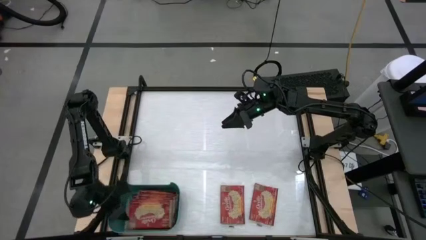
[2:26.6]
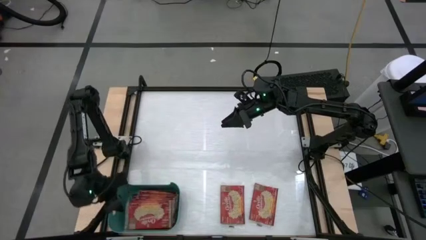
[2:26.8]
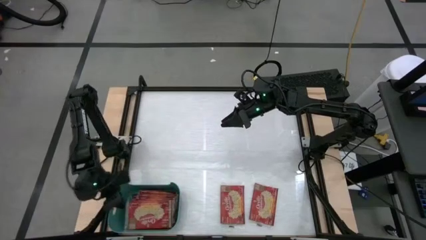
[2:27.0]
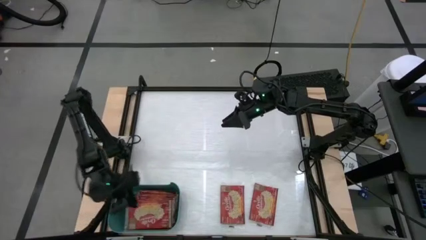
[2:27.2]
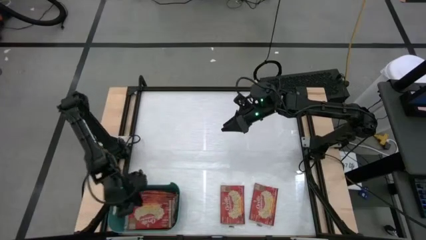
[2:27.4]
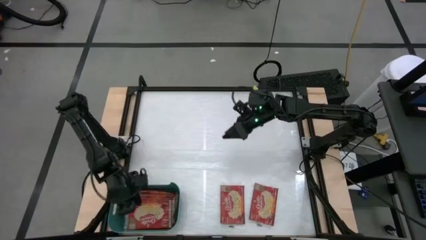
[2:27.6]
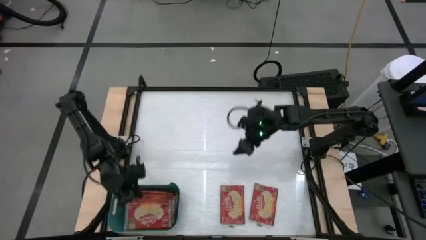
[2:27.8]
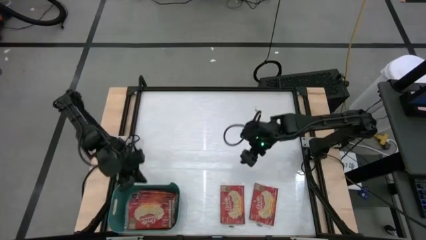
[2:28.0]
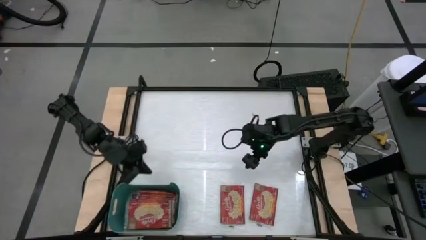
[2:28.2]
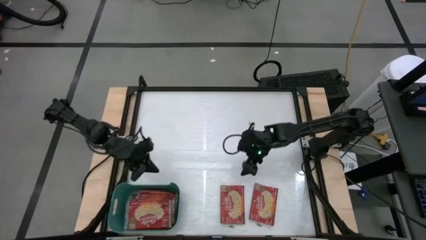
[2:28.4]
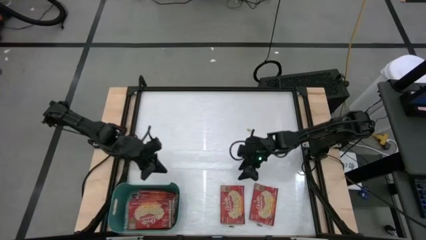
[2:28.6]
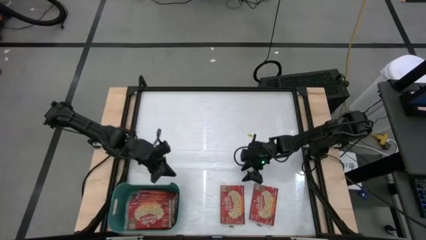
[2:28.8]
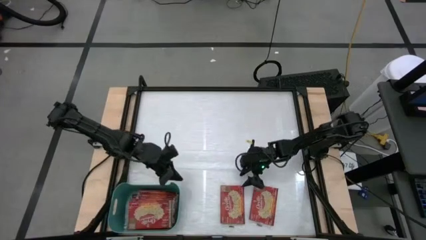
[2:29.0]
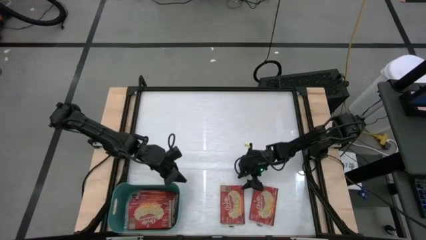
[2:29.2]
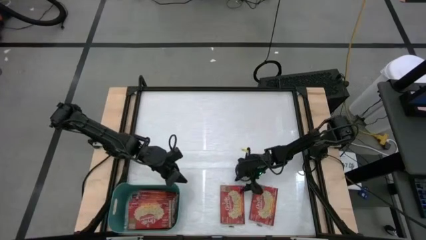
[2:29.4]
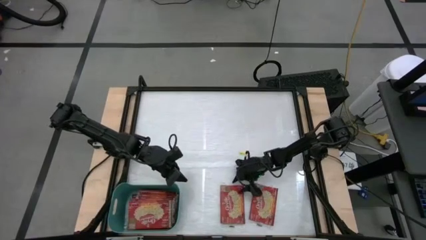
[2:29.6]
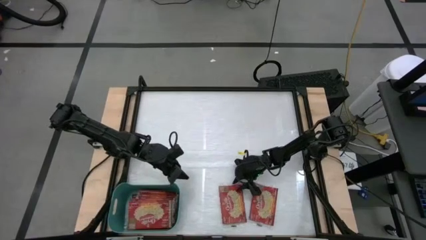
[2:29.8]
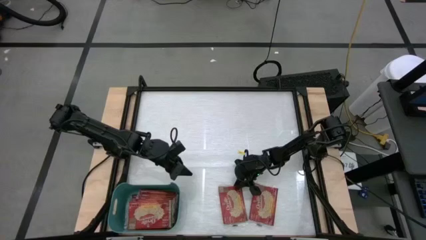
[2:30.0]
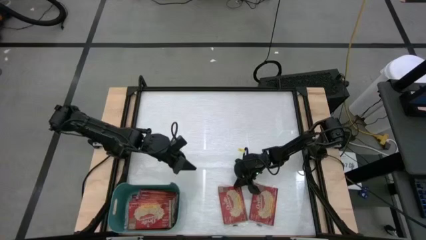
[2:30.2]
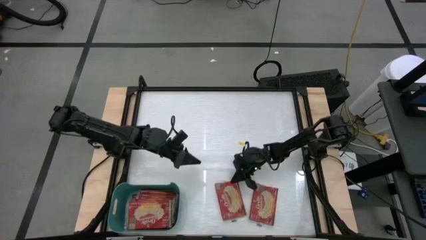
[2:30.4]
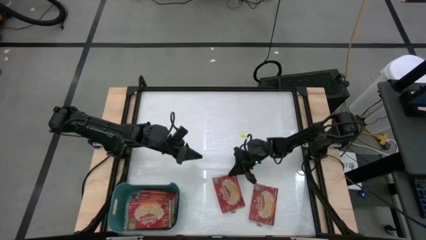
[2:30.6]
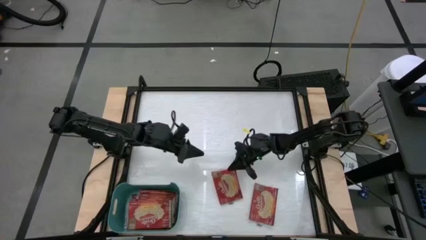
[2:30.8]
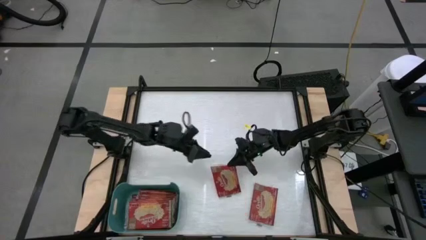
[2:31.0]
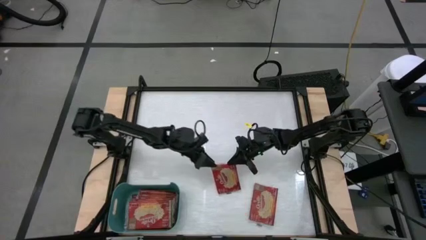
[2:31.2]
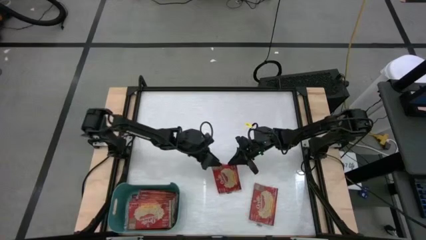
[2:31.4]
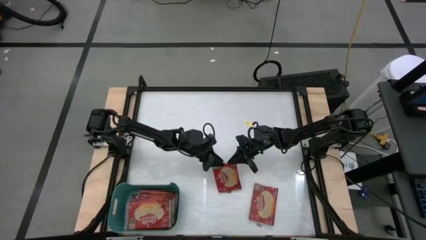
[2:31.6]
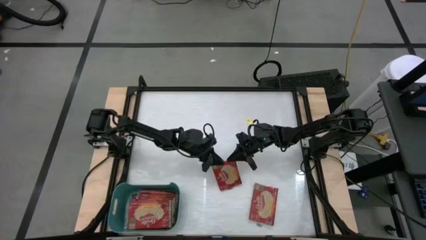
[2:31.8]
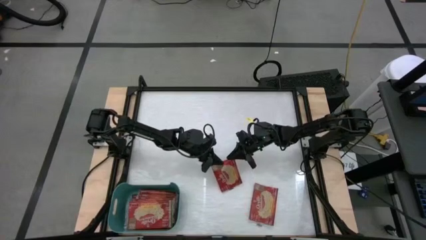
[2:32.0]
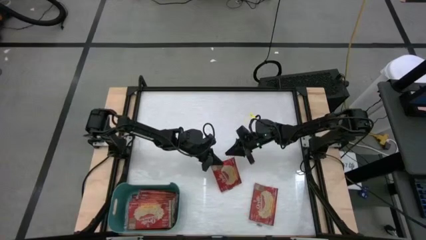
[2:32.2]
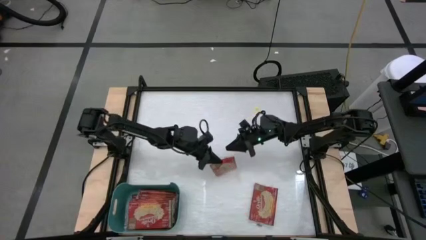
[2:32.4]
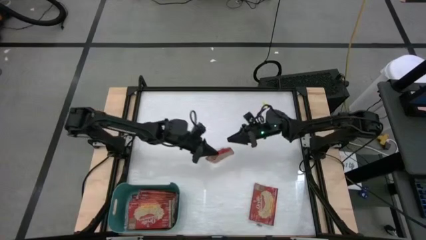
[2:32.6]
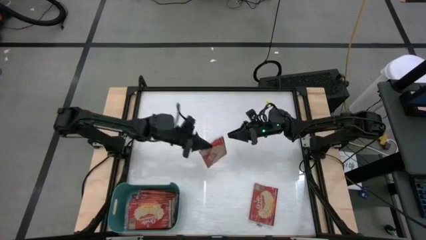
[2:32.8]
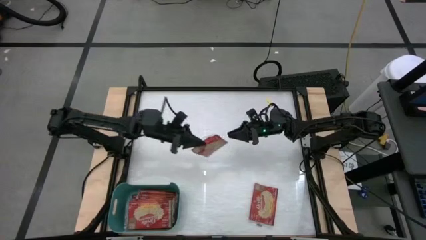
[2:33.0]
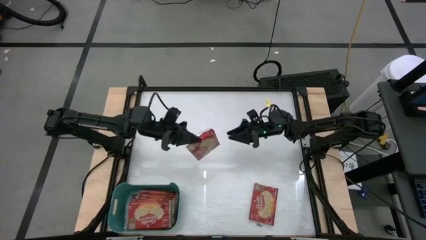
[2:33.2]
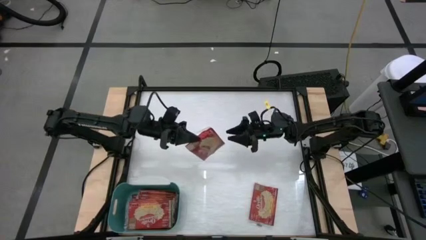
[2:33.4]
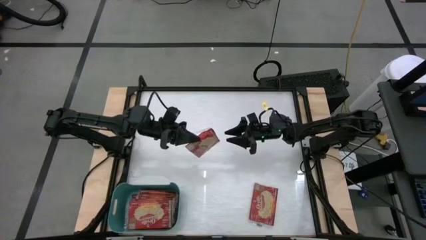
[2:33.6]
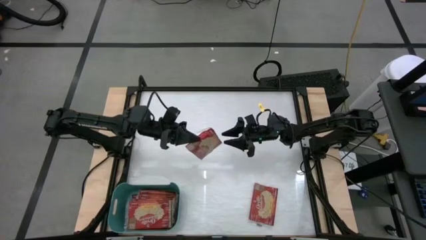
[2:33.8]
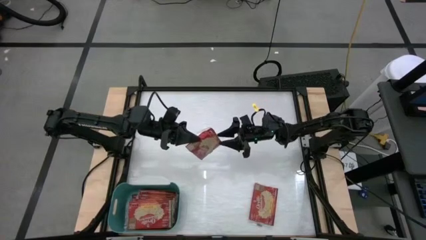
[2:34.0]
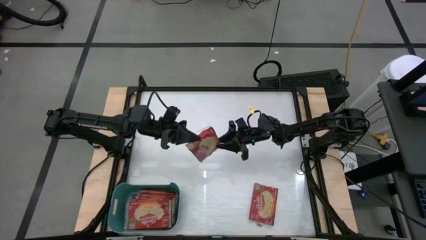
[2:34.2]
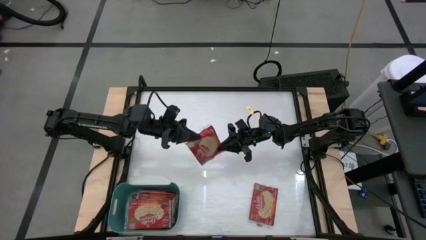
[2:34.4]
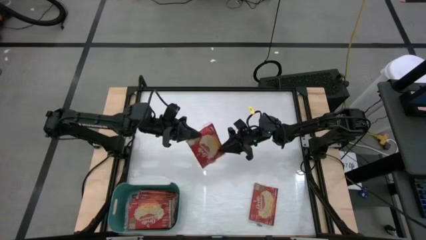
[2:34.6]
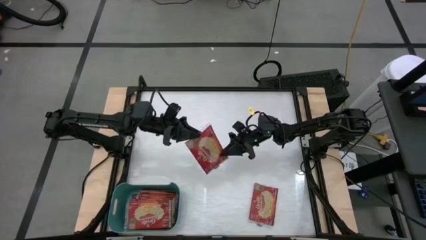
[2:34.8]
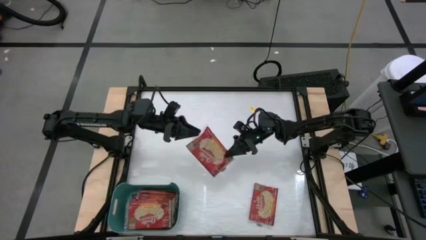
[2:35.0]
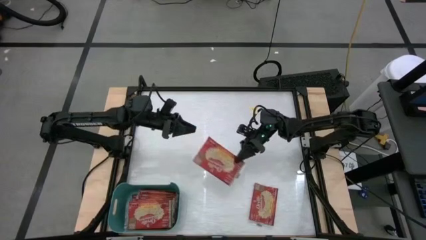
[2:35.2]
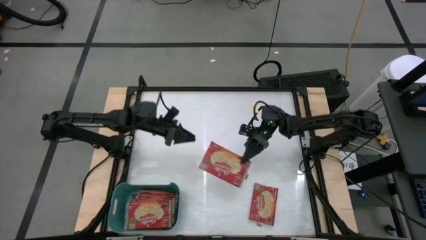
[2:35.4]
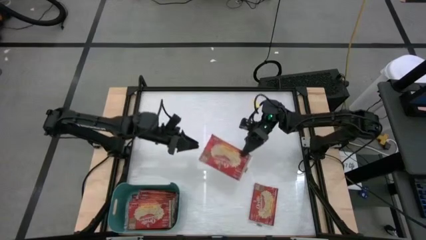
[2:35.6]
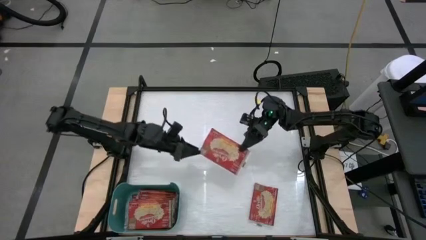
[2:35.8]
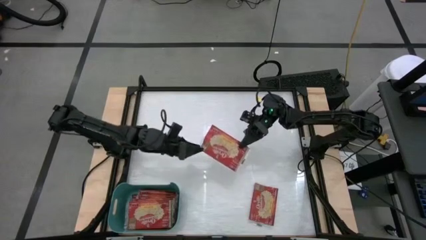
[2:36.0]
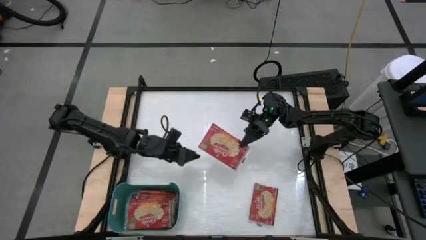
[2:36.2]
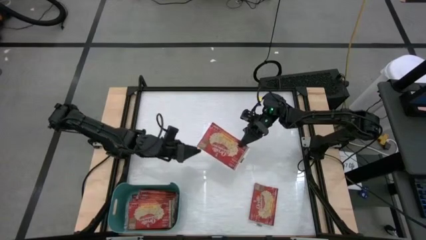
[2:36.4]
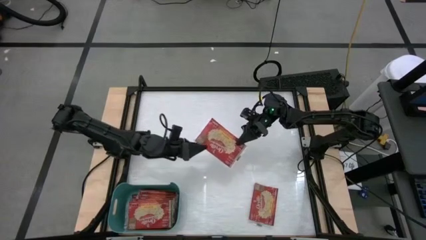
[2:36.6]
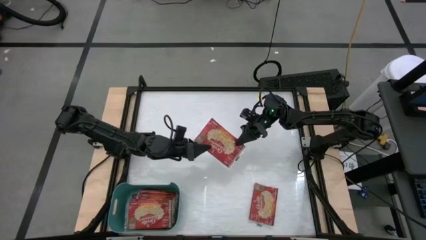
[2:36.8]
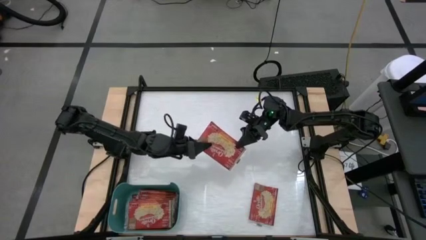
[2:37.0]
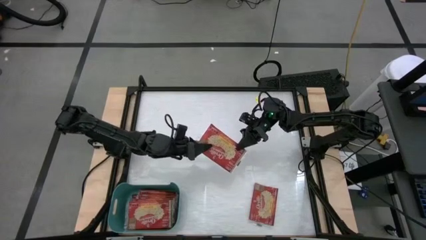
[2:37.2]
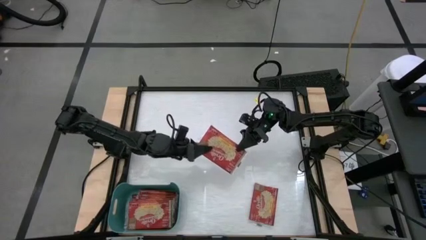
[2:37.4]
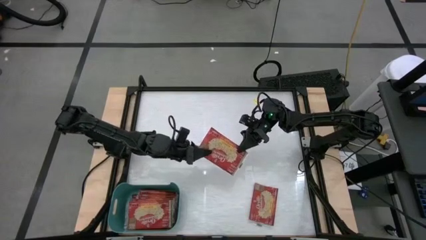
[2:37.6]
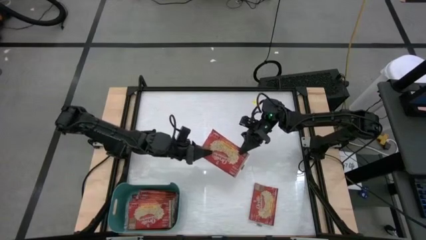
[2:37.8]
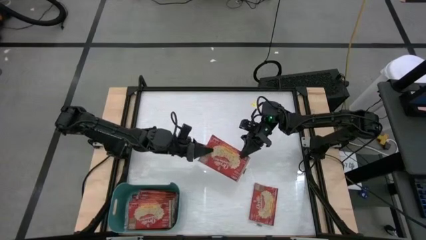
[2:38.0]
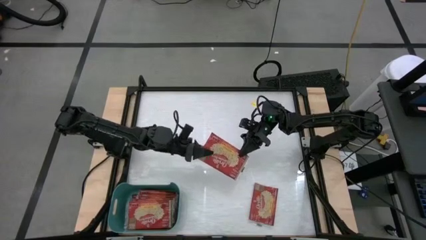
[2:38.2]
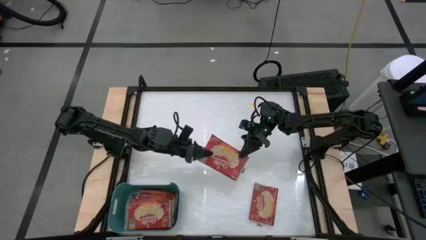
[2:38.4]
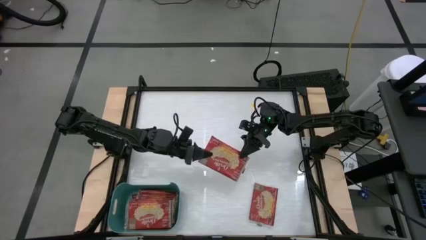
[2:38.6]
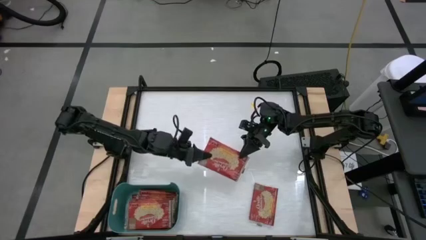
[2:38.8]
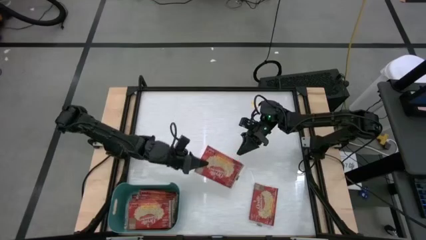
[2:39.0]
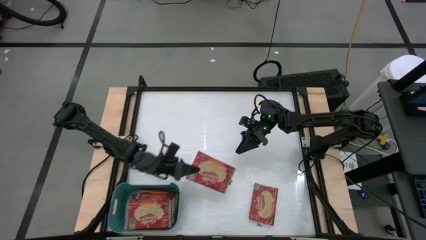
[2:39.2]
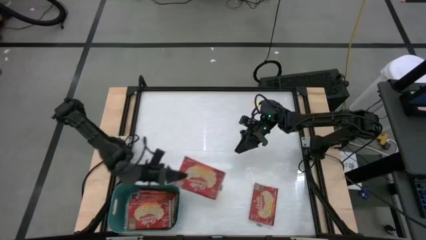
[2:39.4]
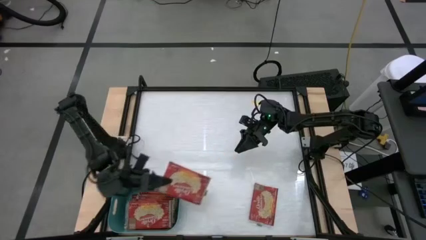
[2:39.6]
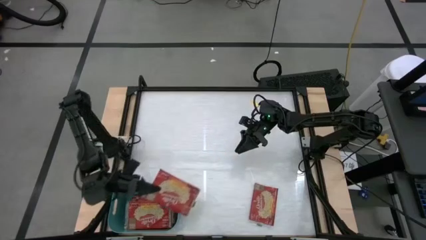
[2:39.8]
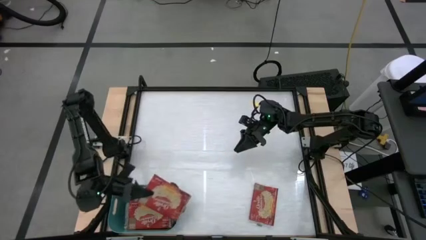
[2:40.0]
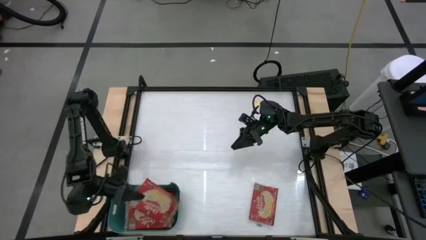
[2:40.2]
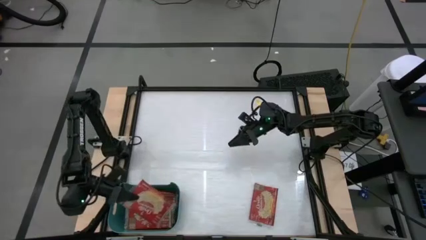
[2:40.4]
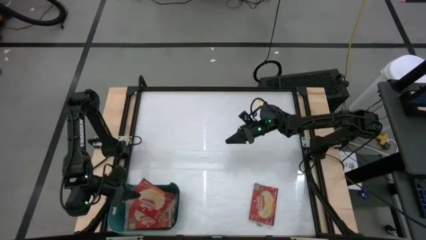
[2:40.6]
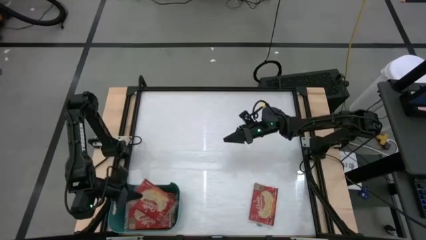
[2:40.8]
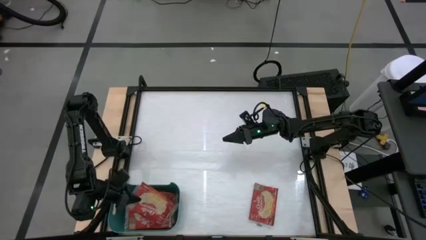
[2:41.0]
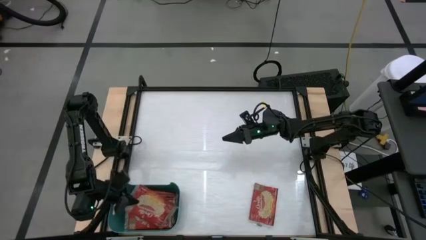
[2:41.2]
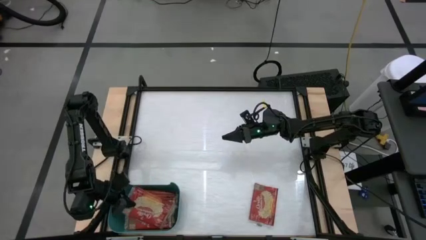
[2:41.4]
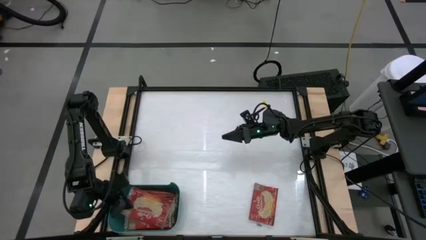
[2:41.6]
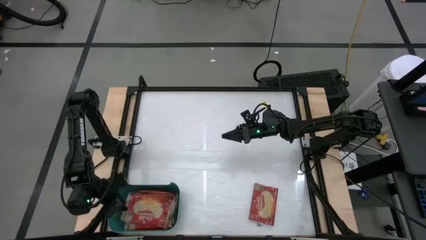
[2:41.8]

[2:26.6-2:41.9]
Task: Sort popcorn bags into baskets
Put the red popcorn bag into the green bin
